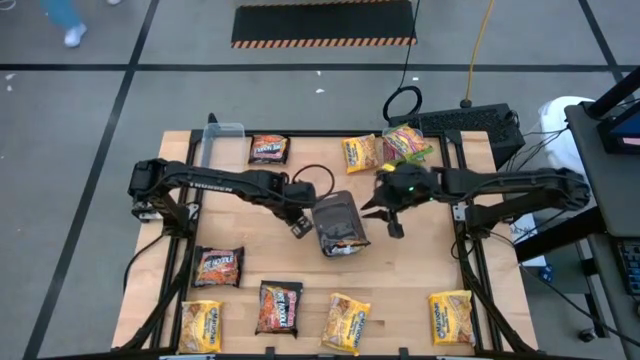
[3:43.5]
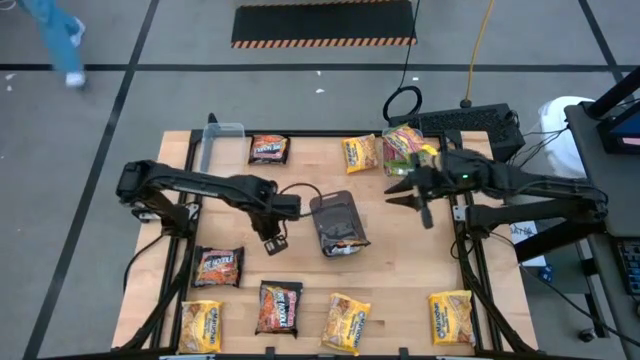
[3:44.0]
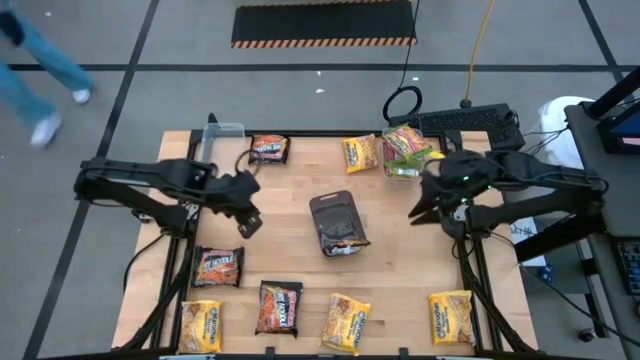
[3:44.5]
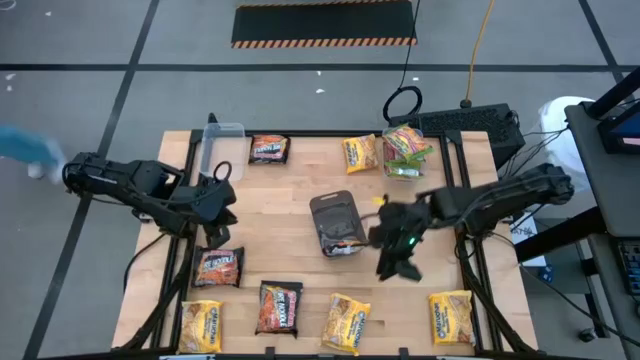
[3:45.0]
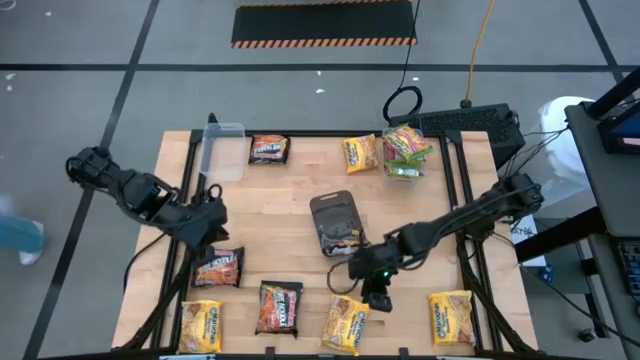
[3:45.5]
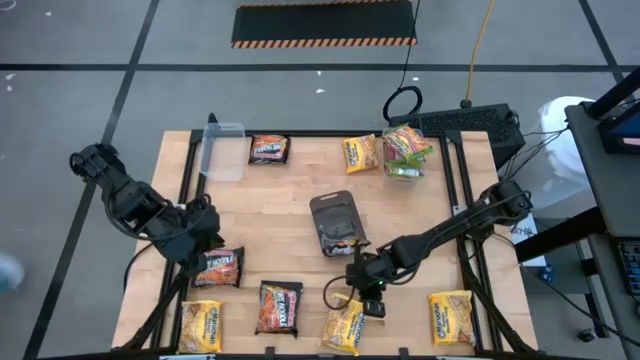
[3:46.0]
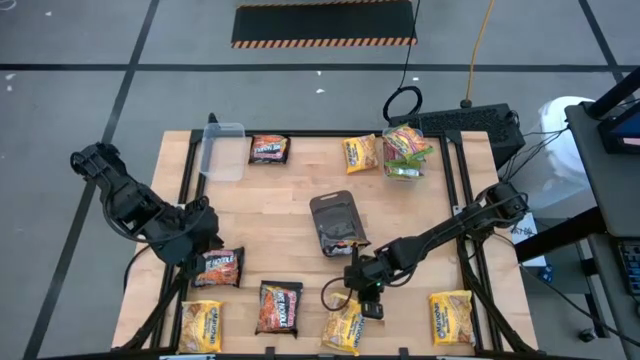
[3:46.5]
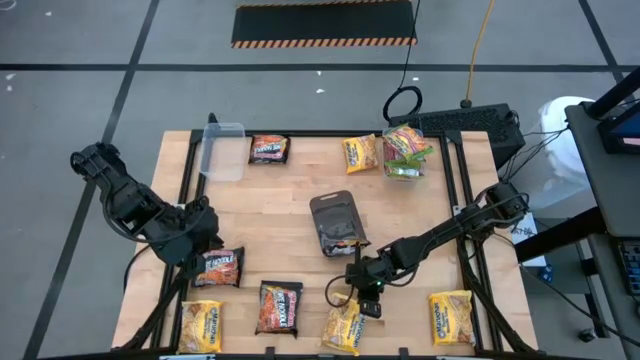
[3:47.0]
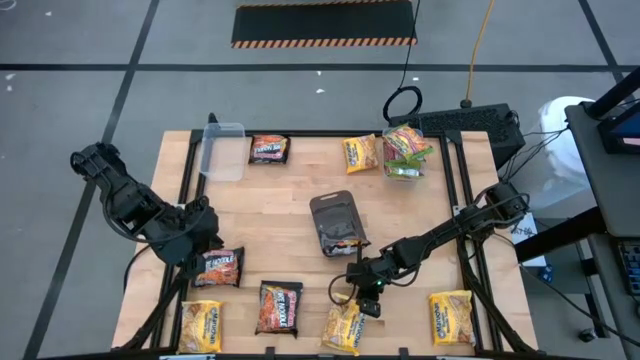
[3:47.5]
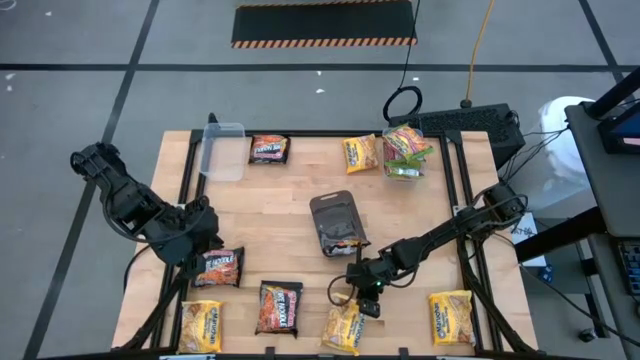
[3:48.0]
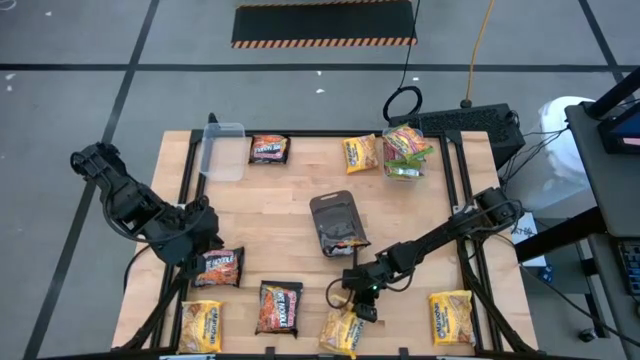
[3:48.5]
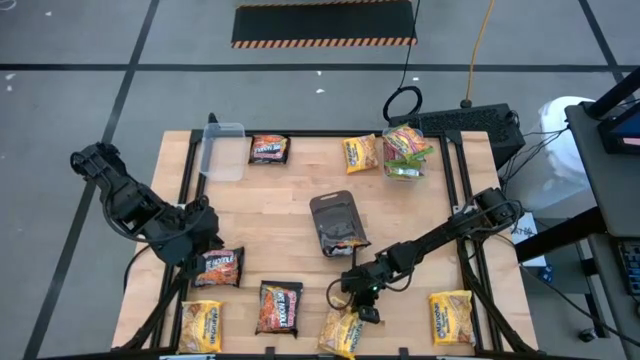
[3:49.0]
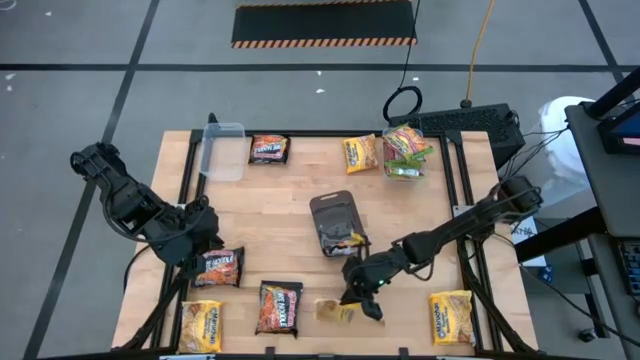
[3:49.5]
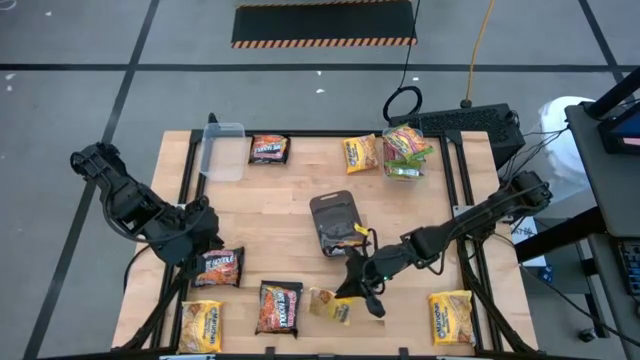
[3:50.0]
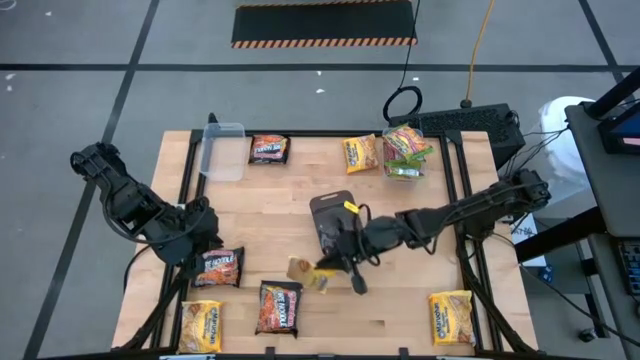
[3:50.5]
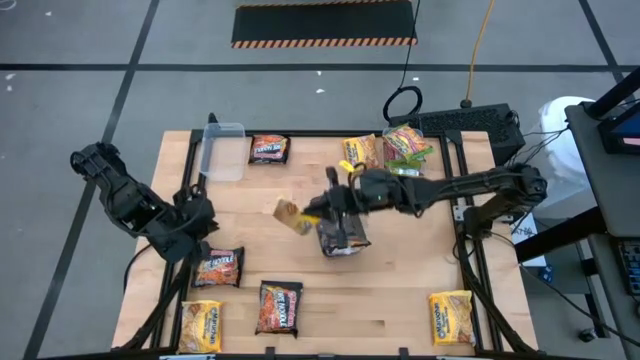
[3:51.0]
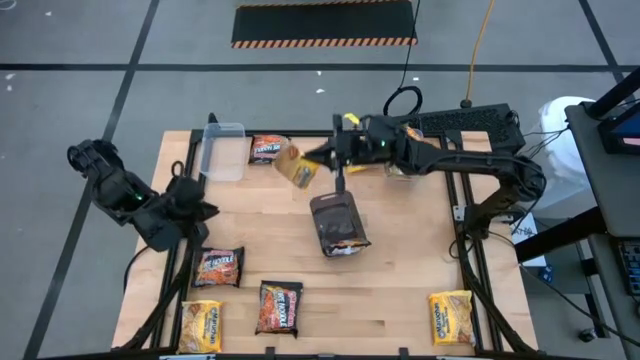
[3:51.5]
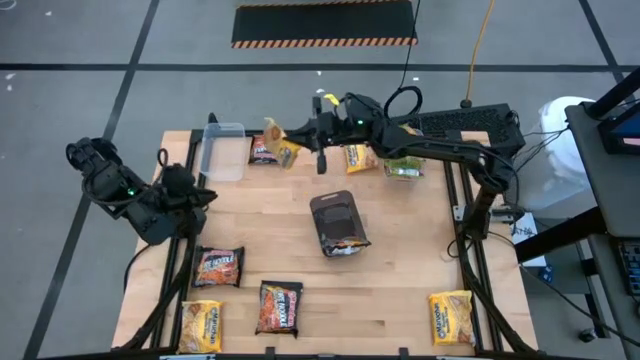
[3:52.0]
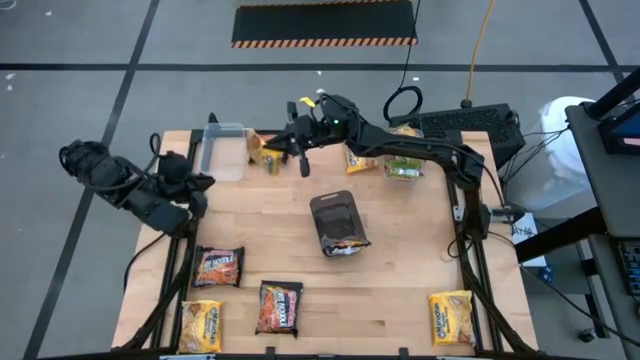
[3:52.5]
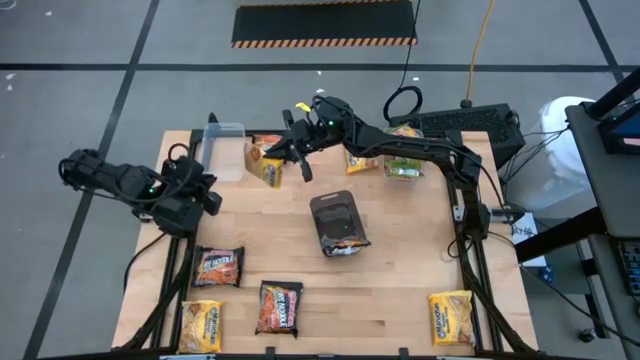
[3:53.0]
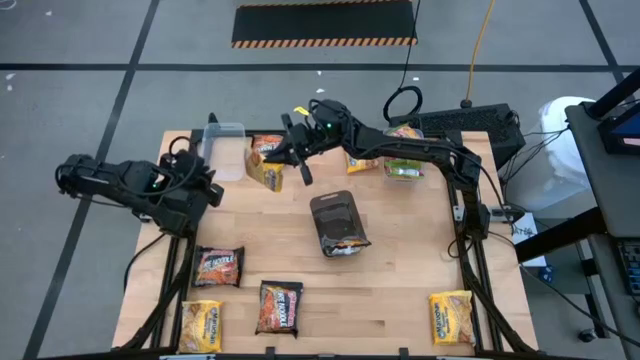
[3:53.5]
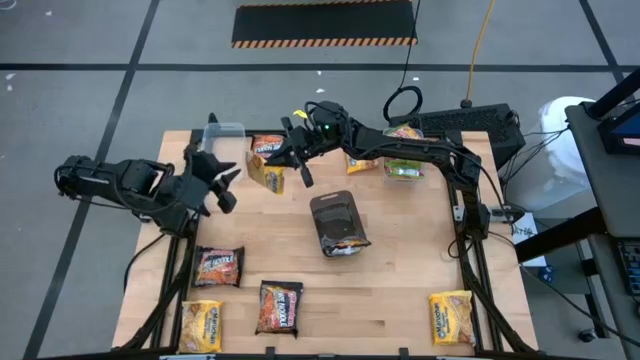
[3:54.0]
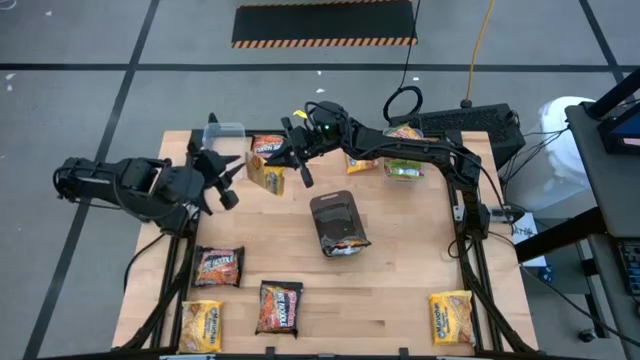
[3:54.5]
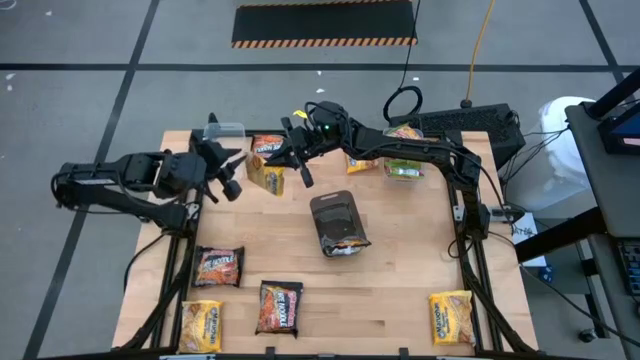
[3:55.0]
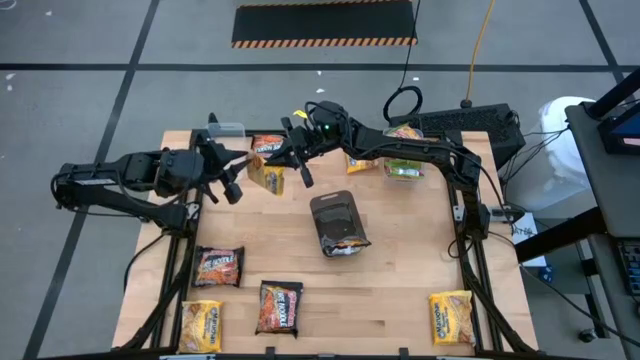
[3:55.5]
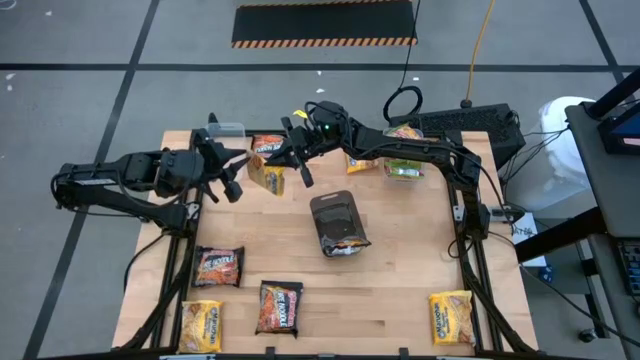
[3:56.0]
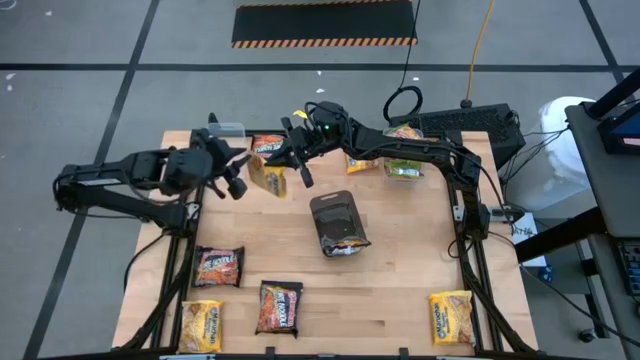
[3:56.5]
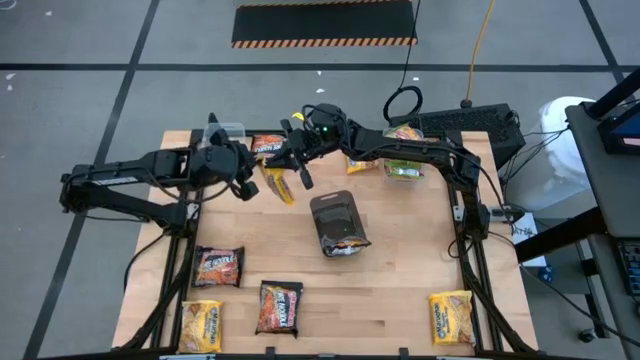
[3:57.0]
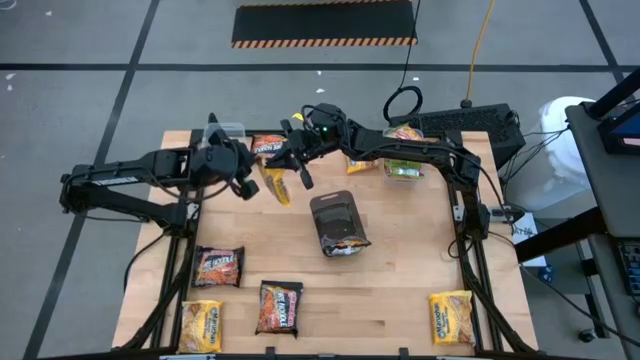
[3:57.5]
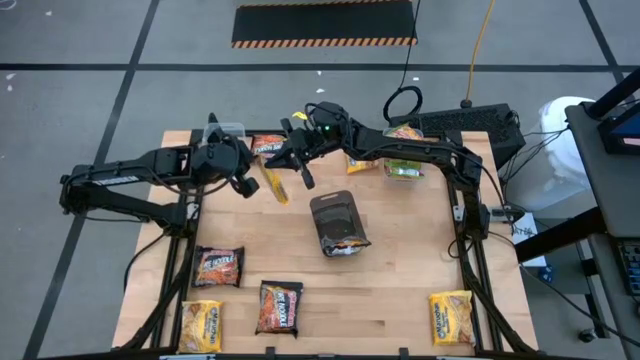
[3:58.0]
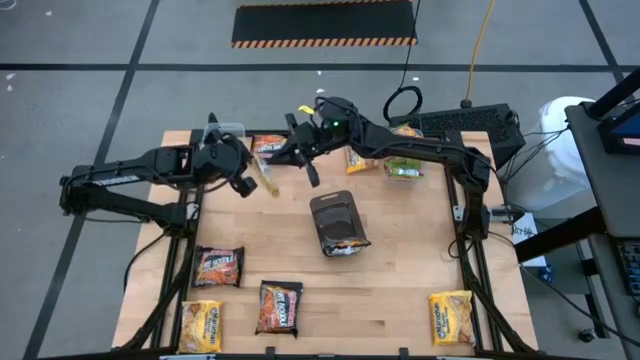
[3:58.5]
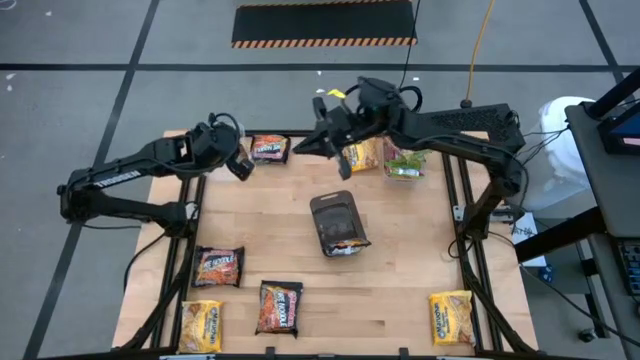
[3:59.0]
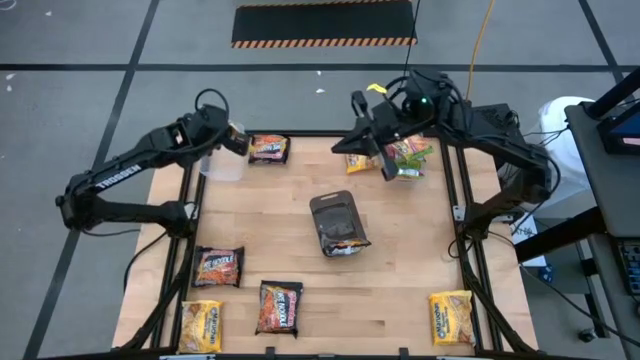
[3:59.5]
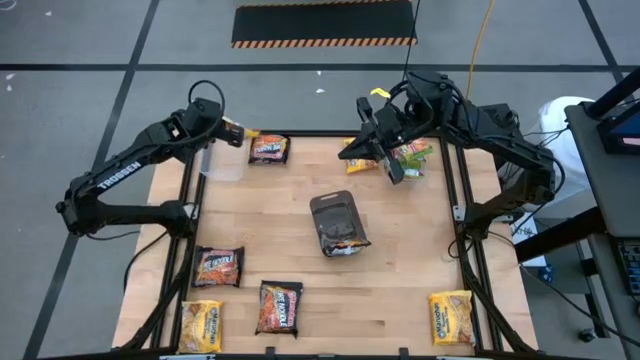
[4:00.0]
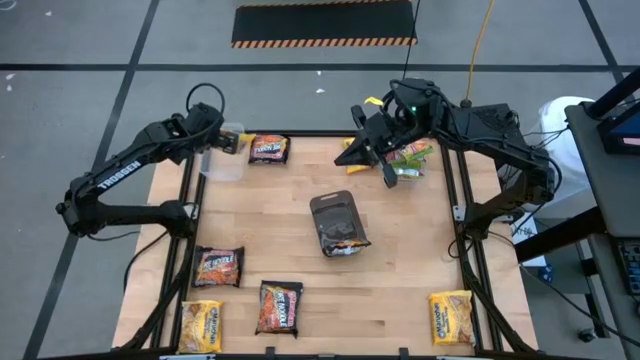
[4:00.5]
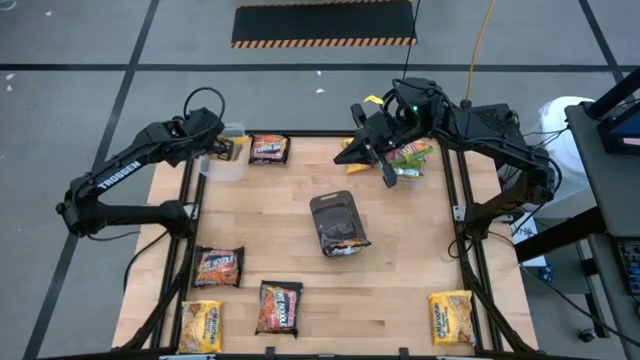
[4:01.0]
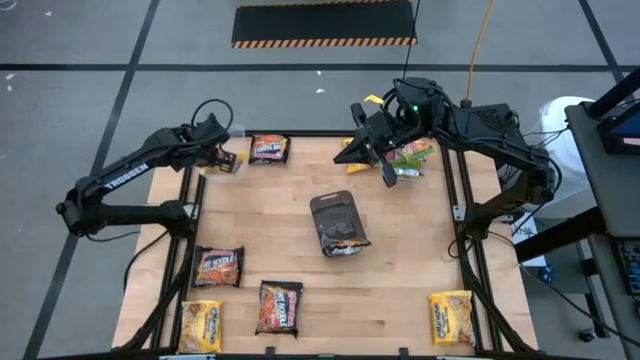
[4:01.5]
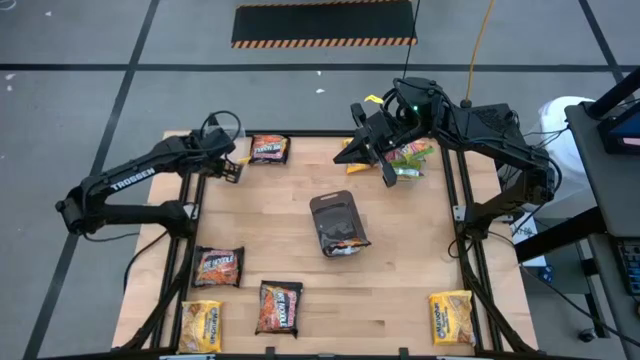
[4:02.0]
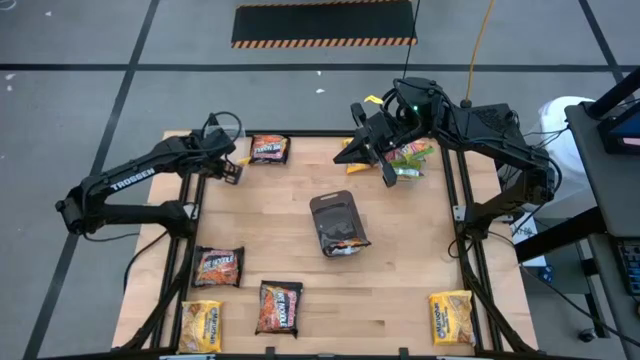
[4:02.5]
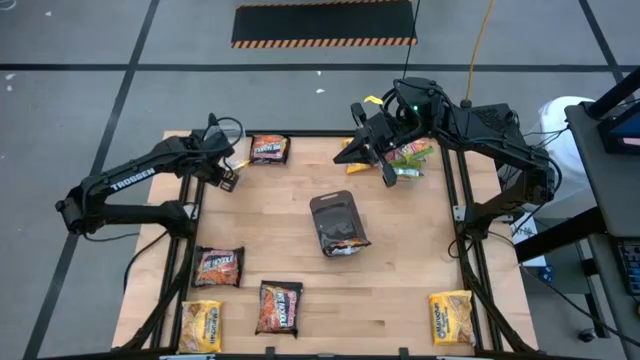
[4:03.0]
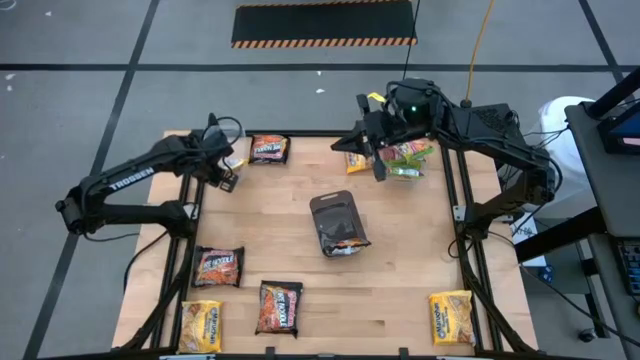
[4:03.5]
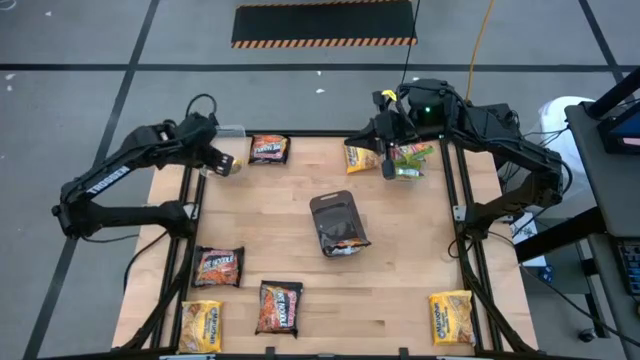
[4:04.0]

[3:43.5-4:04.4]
Task: Sort Maruchan noodles
Put the bottom middle yellow noodle pack into the left transparent bin
